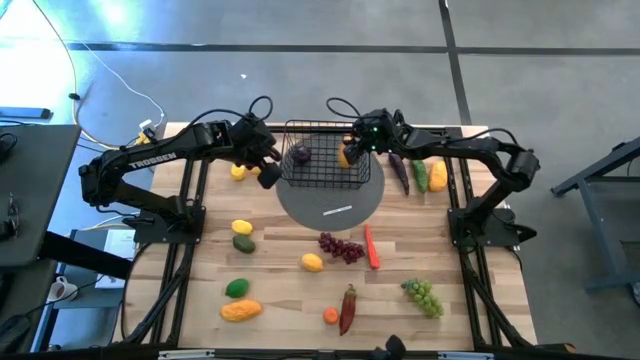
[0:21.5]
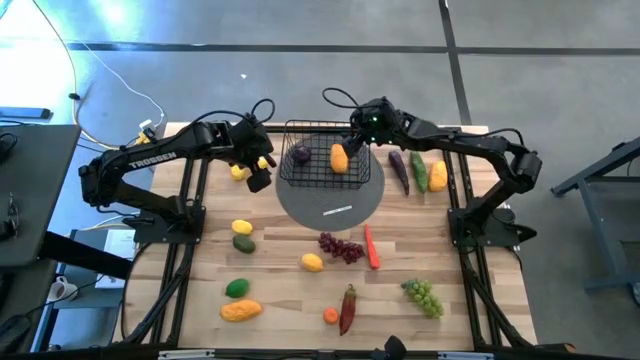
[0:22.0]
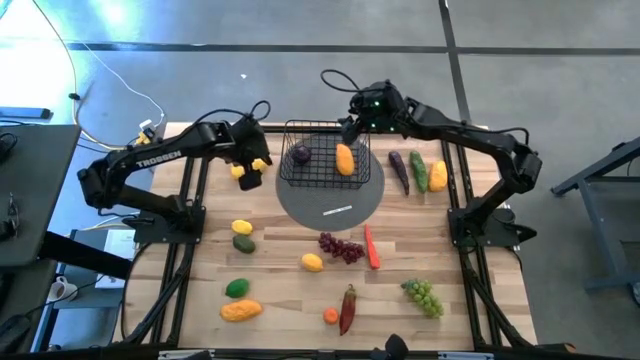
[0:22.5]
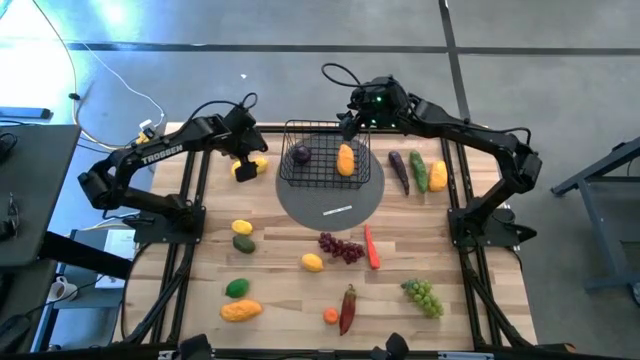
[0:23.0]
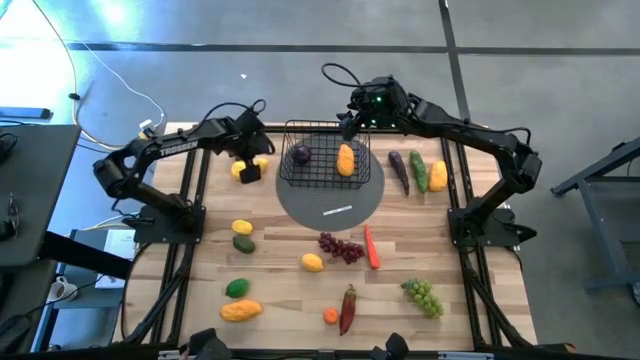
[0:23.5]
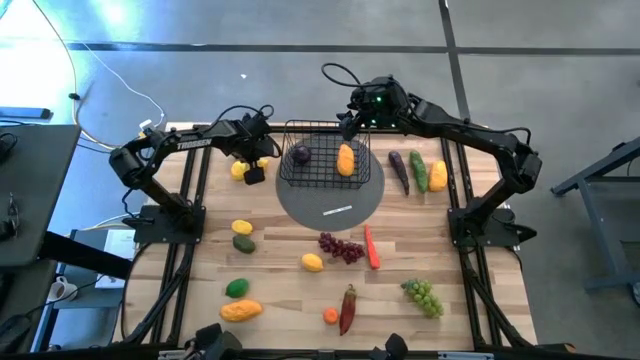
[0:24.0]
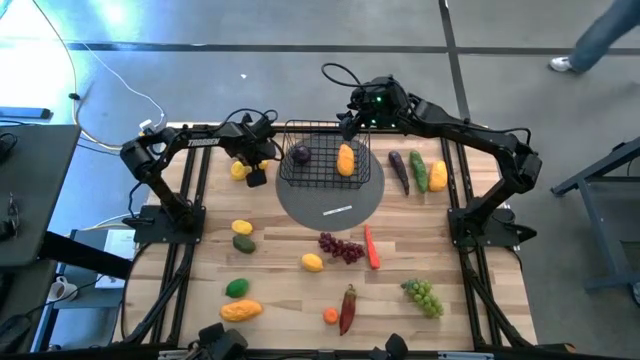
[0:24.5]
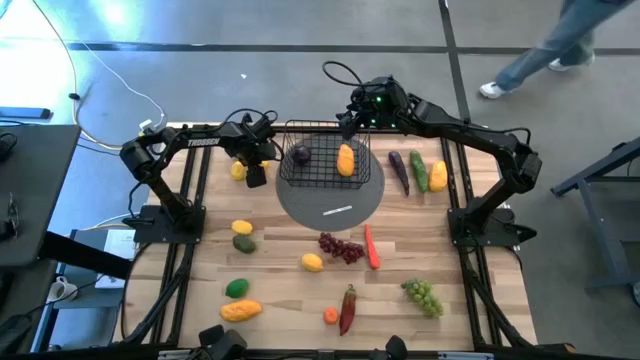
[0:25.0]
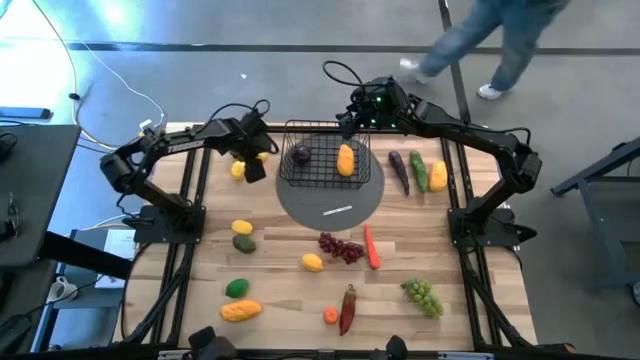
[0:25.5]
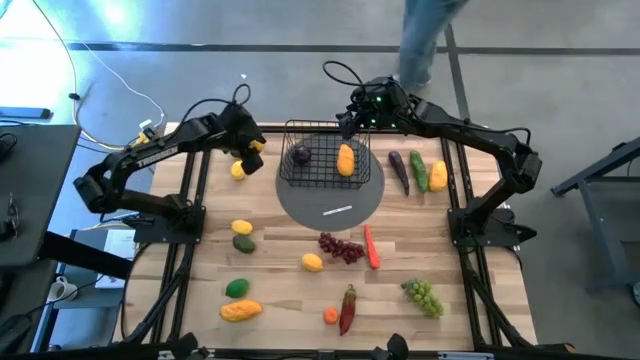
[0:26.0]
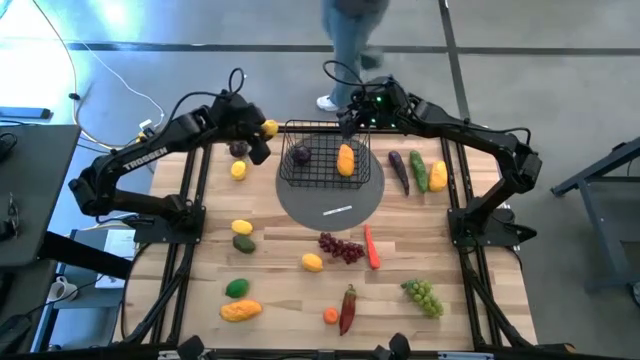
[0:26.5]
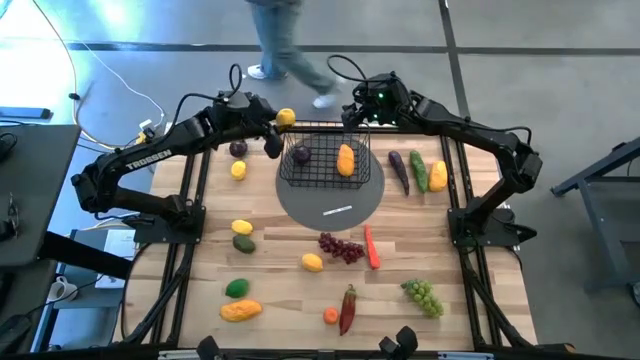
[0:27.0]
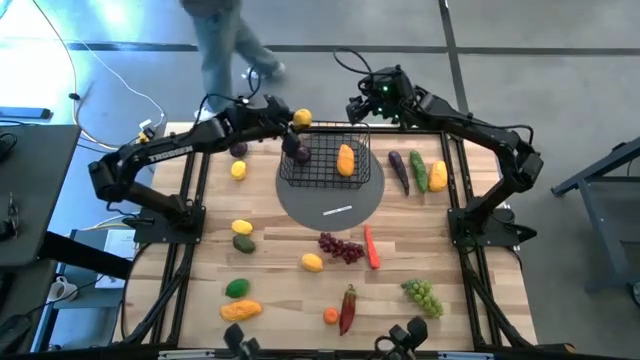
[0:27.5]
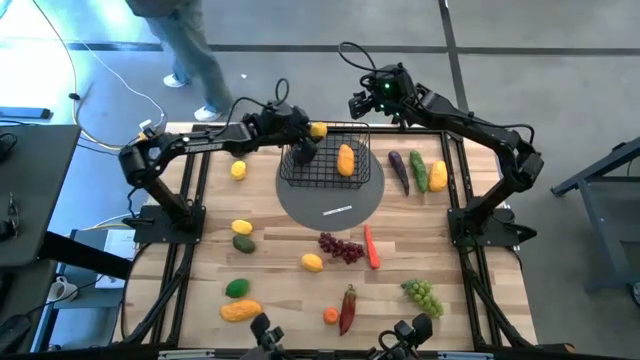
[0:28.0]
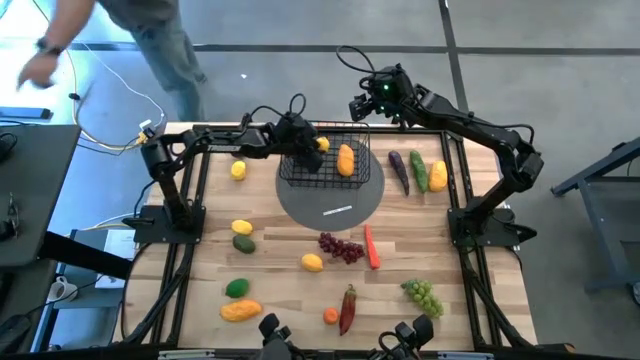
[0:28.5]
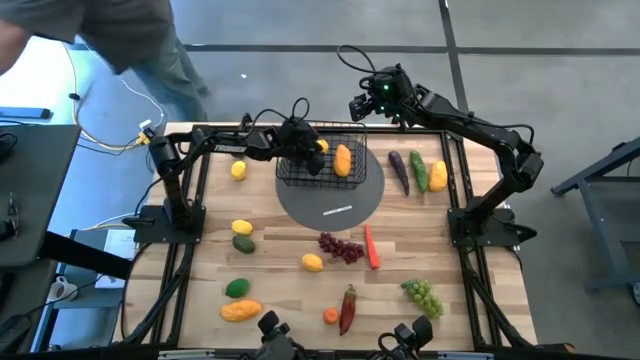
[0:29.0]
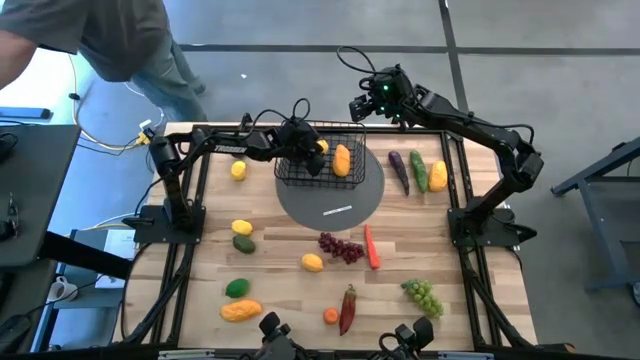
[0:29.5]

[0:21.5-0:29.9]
Task: Build produce basket
Put the top right yellow lemon into the black wire basket

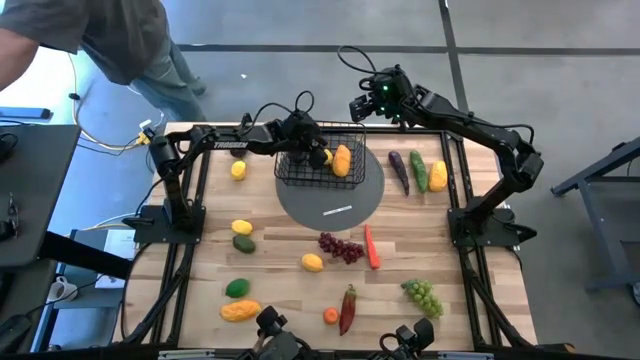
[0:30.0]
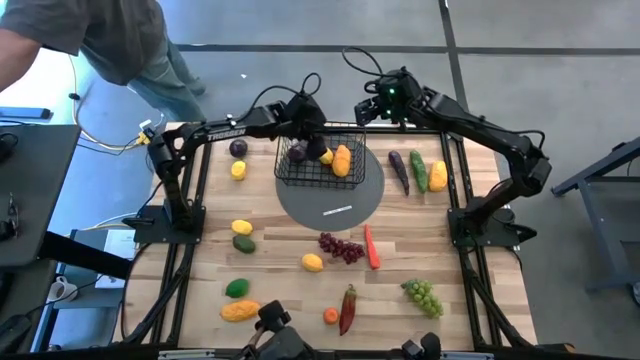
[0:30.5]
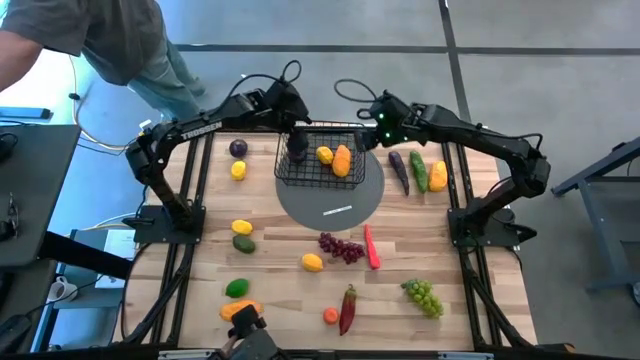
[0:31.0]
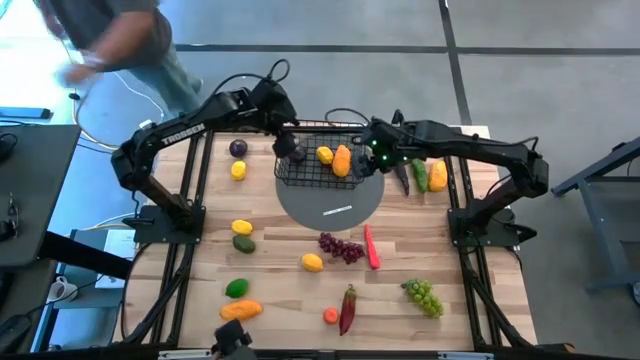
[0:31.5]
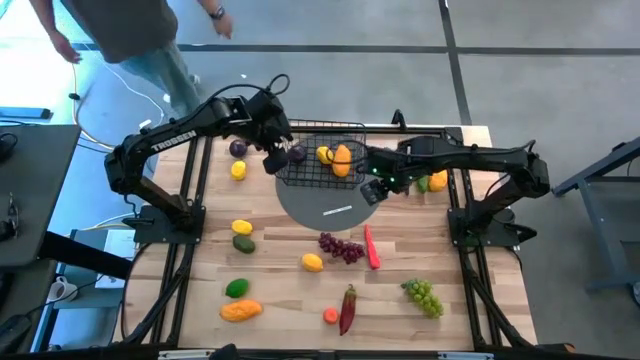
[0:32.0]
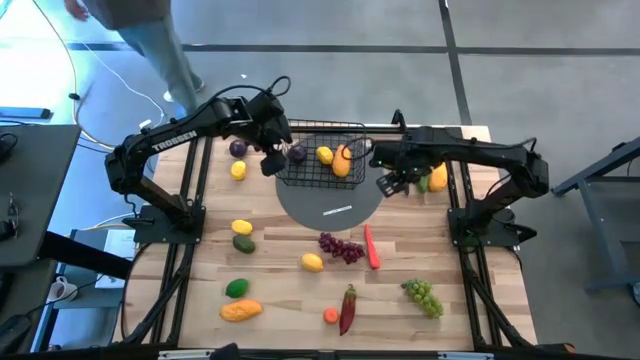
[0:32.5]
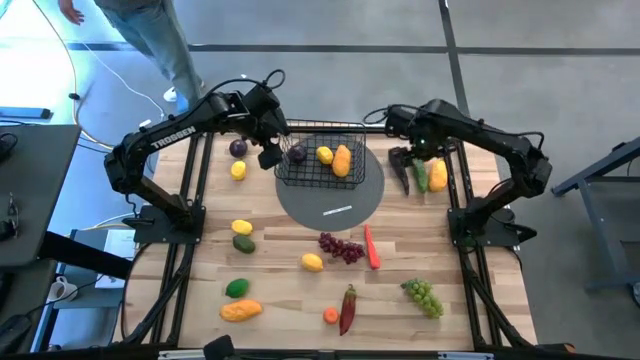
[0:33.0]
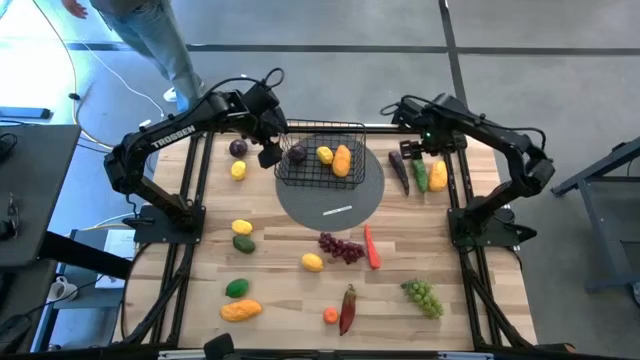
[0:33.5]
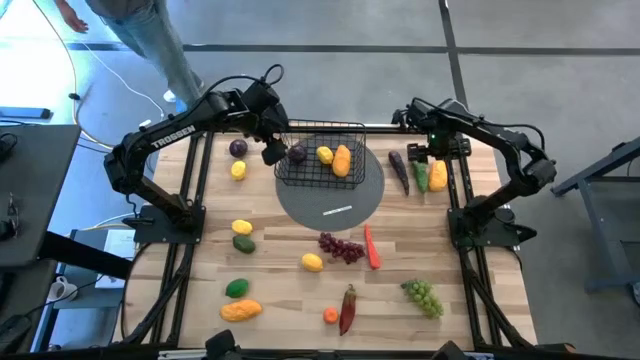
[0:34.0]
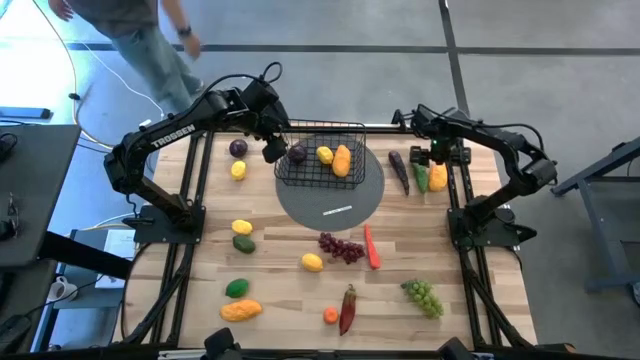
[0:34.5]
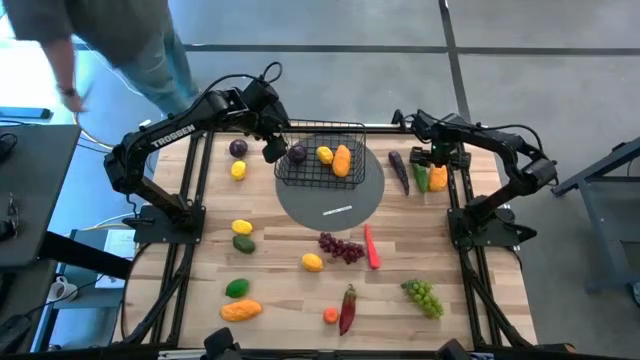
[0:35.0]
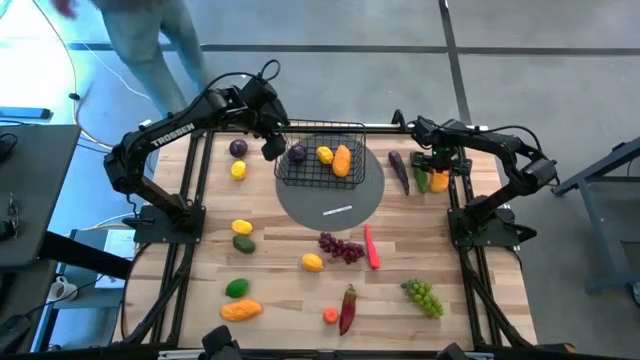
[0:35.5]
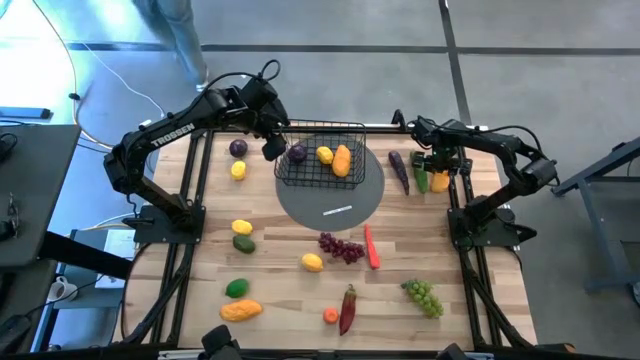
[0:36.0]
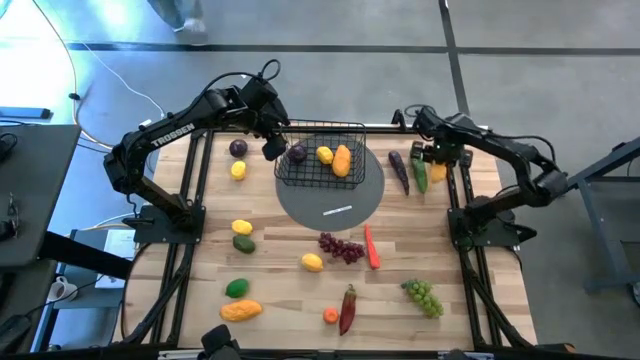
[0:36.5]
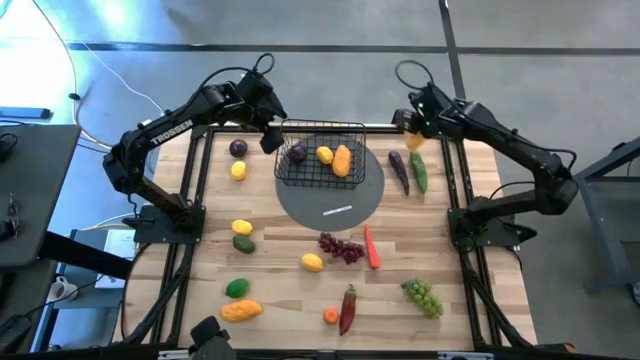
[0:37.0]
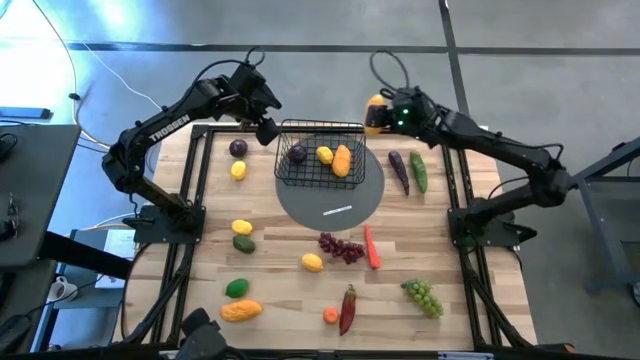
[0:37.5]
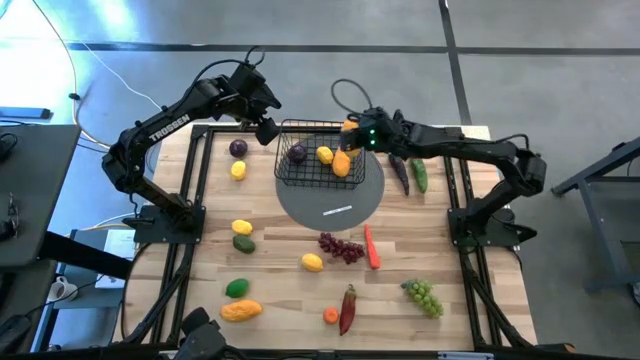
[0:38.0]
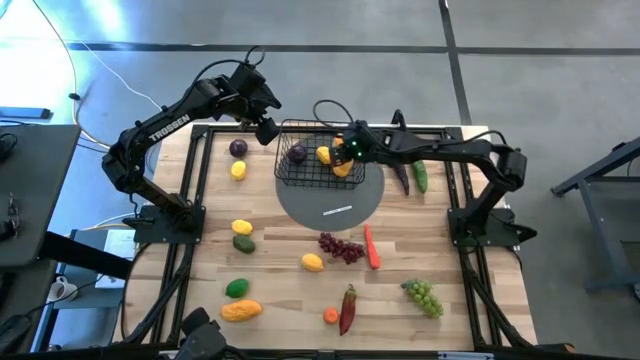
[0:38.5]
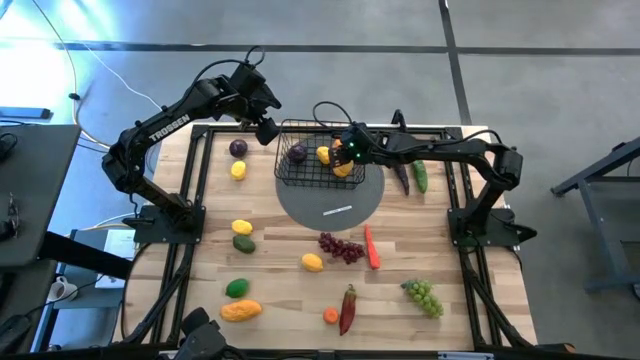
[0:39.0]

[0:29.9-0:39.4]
Put the top yellow mango into the black wire basket

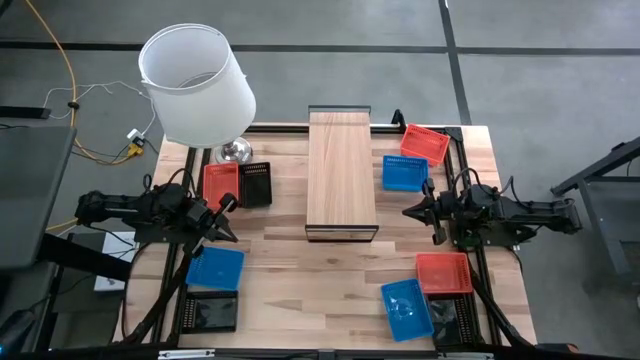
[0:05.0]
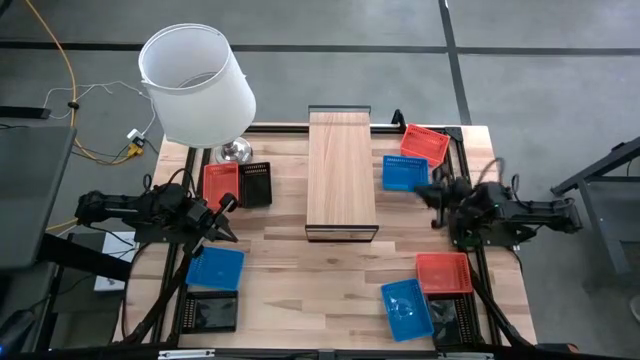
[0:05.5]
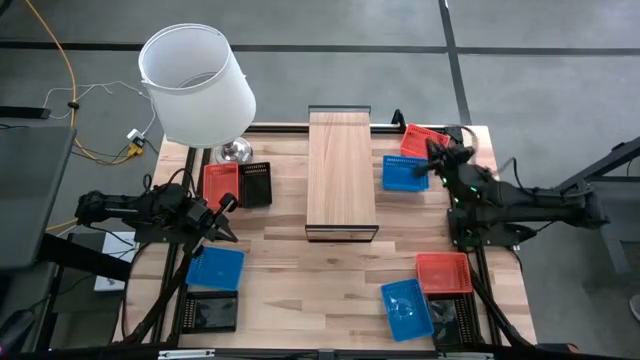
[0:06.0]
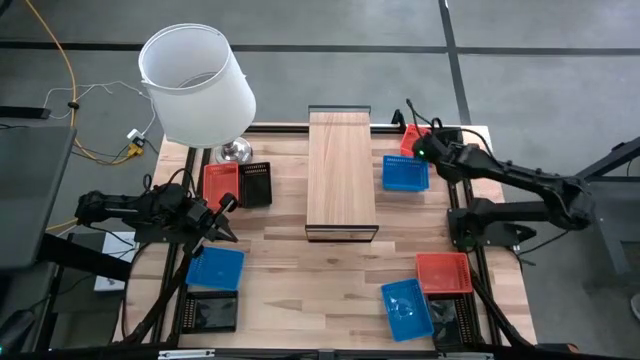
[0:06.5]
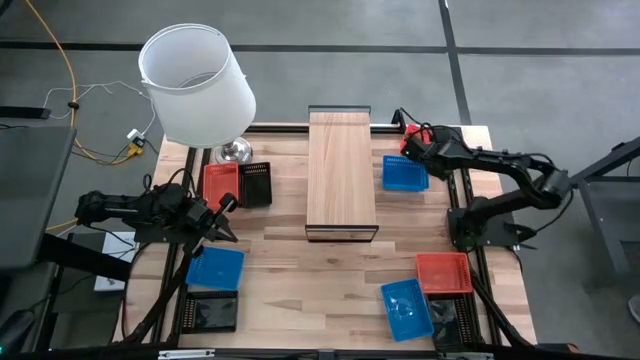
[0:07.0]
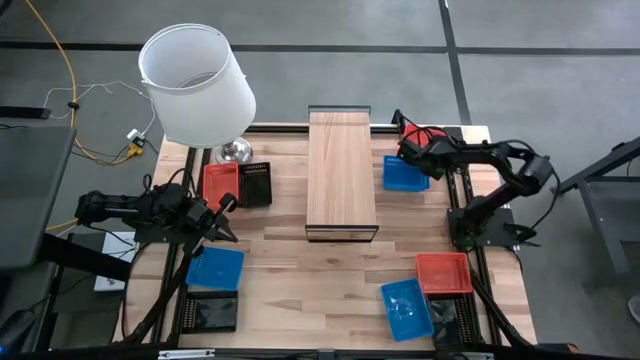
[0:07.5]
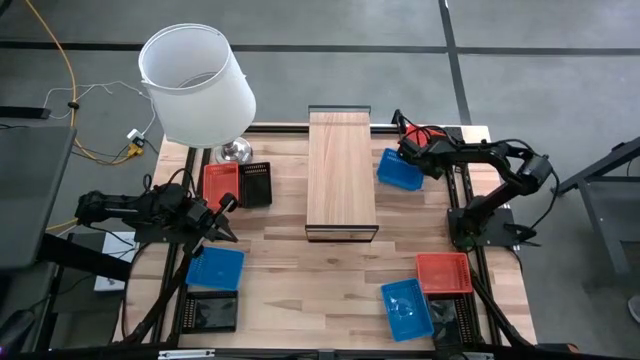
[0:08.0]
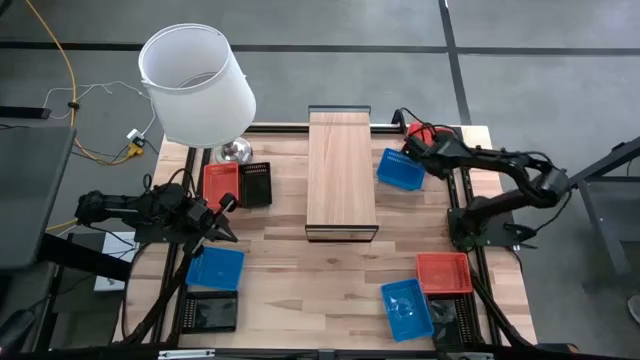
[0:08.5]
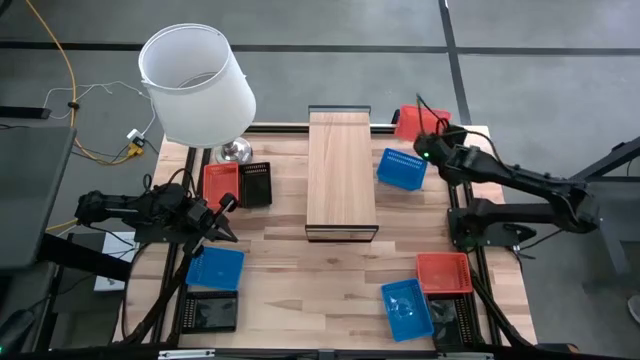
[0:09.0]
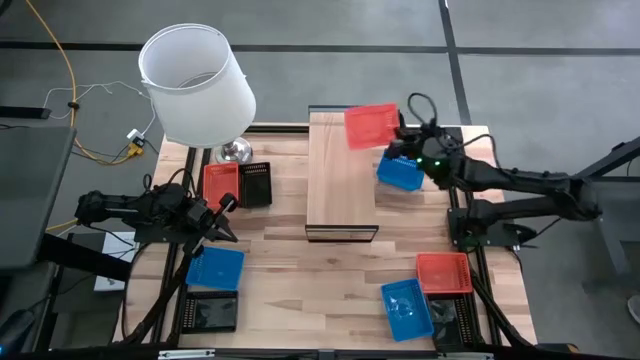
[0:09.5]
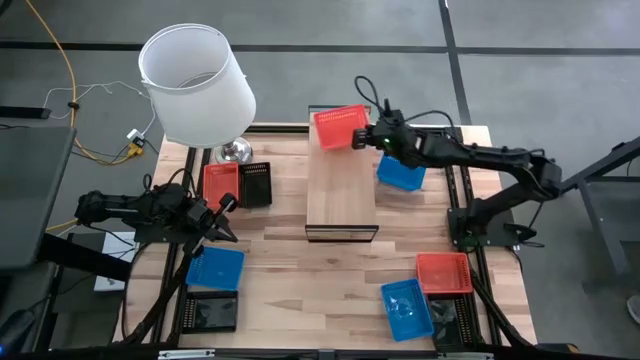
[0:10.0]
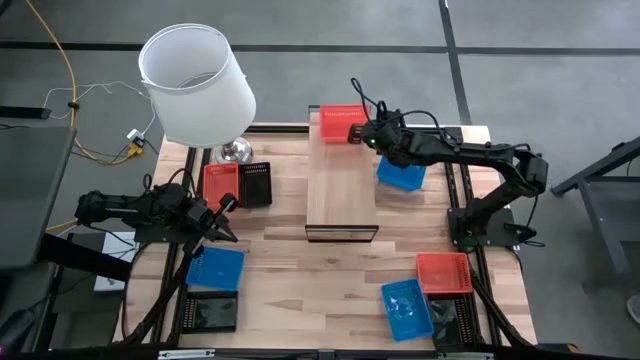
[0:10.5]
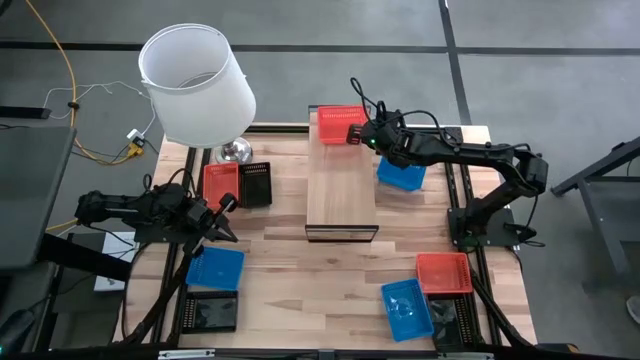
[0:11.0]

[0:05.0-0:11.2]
Task: Stack baskets on shelf by color
Put the top orange bin on the shelf
